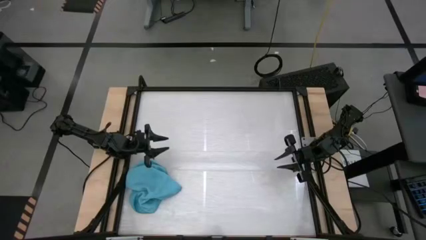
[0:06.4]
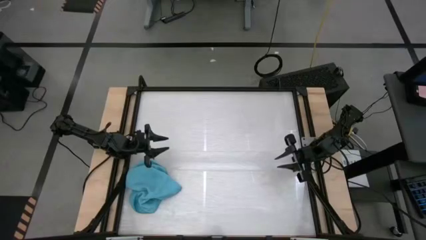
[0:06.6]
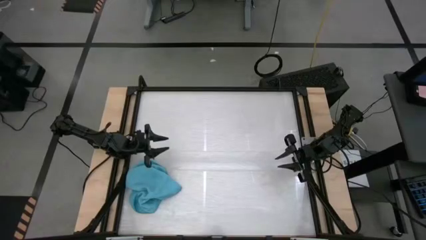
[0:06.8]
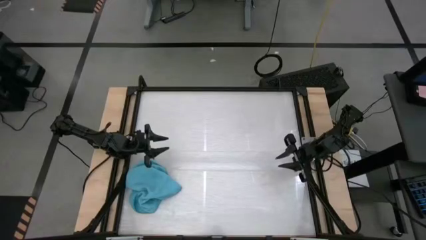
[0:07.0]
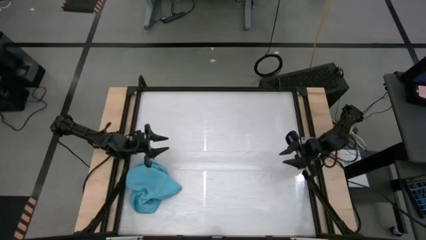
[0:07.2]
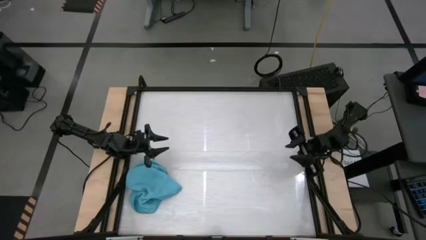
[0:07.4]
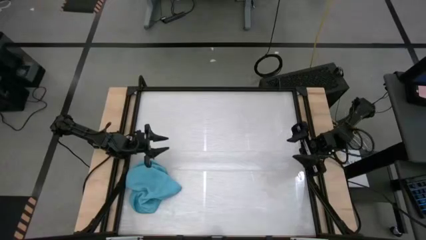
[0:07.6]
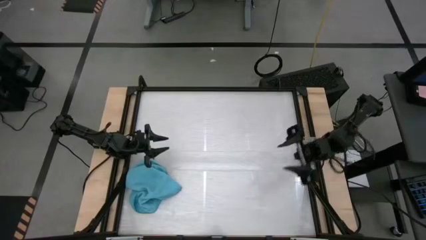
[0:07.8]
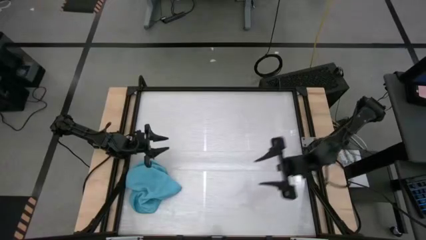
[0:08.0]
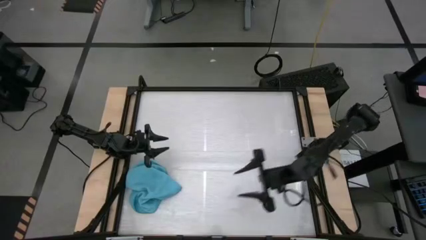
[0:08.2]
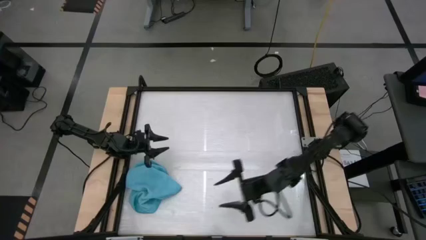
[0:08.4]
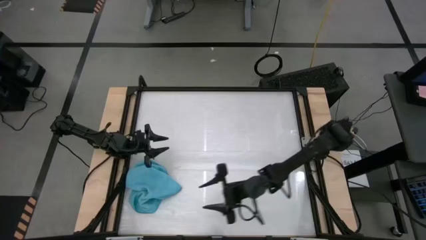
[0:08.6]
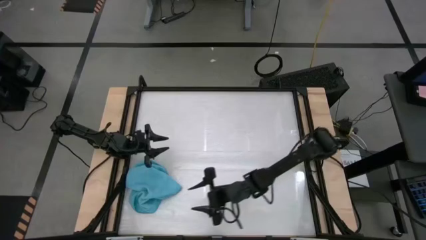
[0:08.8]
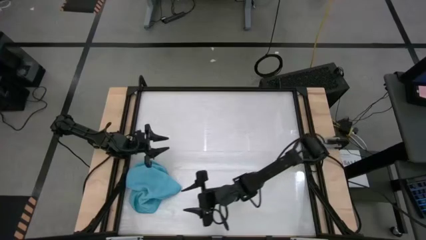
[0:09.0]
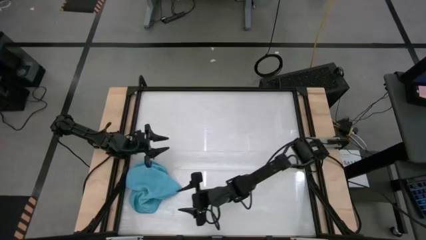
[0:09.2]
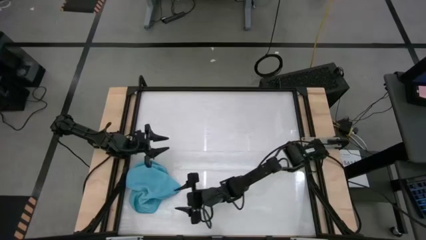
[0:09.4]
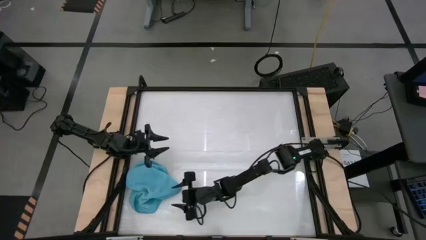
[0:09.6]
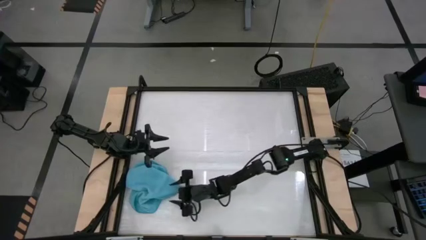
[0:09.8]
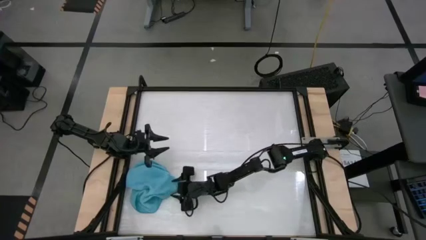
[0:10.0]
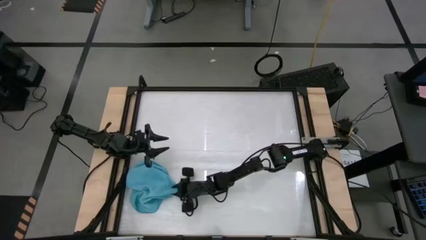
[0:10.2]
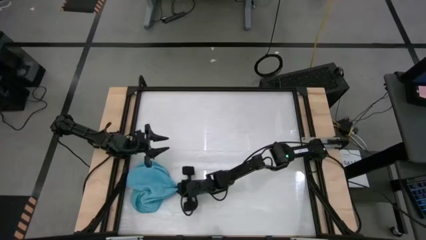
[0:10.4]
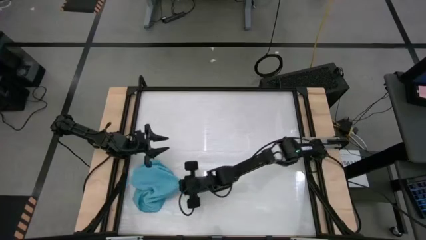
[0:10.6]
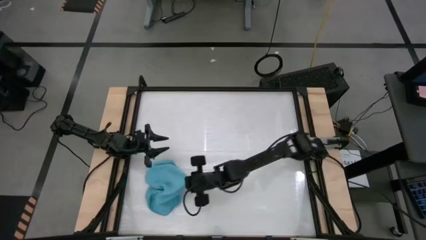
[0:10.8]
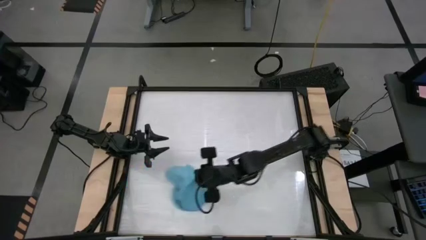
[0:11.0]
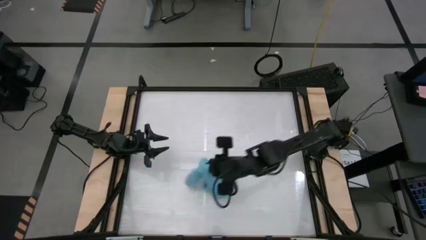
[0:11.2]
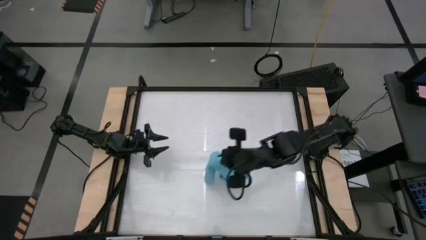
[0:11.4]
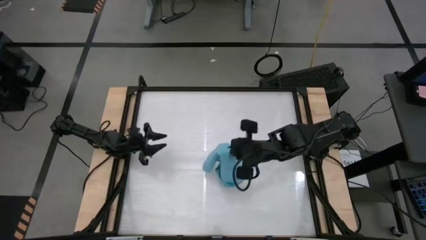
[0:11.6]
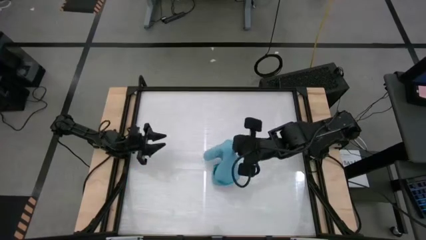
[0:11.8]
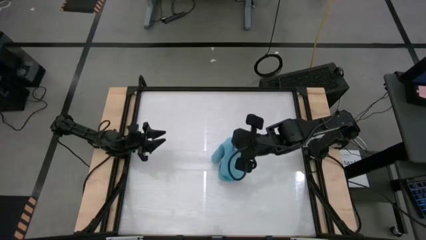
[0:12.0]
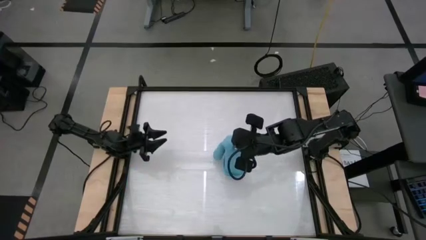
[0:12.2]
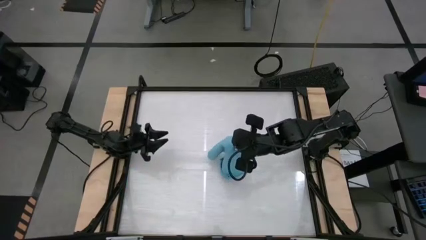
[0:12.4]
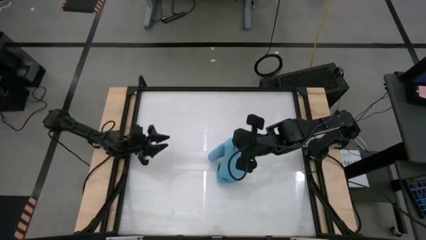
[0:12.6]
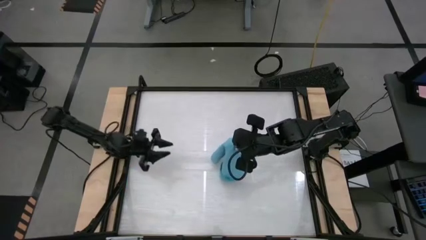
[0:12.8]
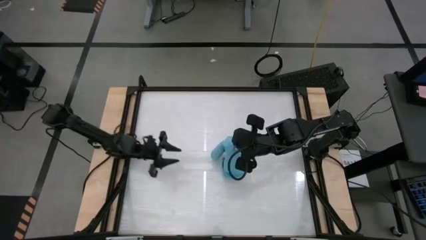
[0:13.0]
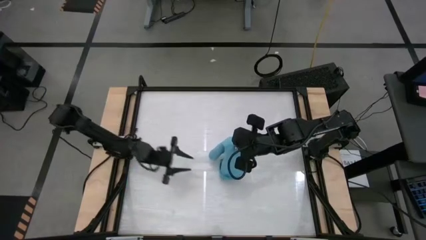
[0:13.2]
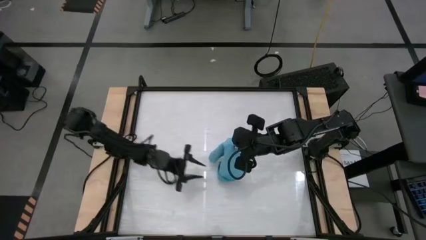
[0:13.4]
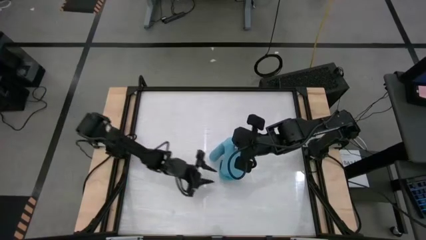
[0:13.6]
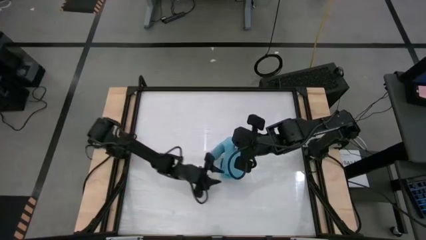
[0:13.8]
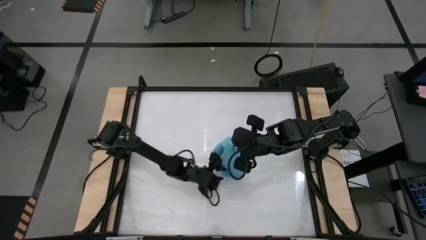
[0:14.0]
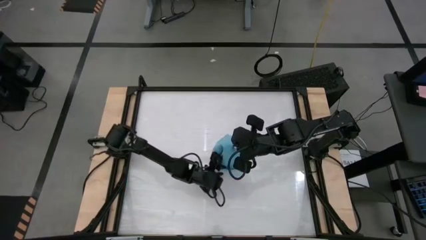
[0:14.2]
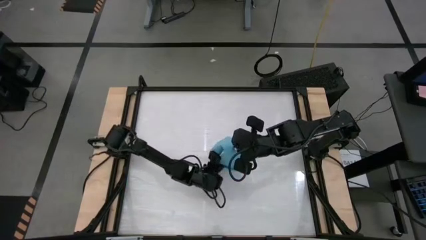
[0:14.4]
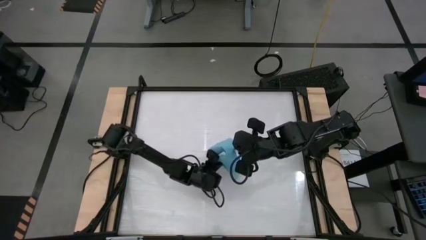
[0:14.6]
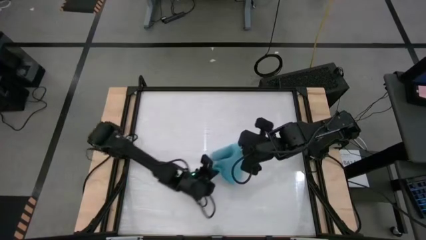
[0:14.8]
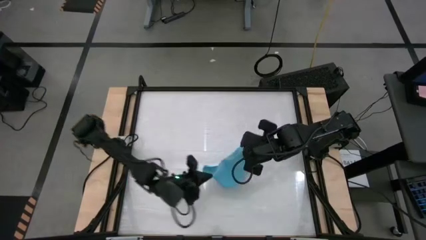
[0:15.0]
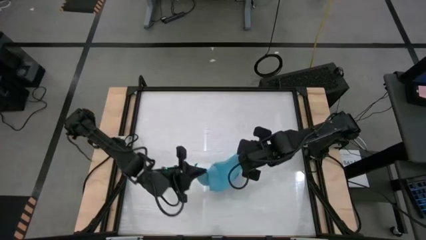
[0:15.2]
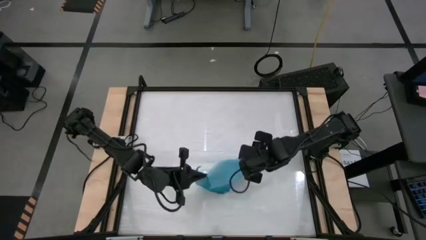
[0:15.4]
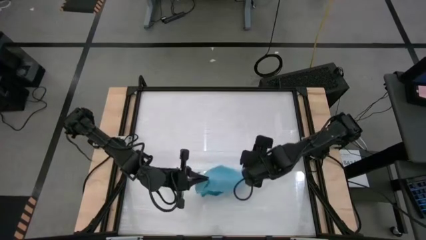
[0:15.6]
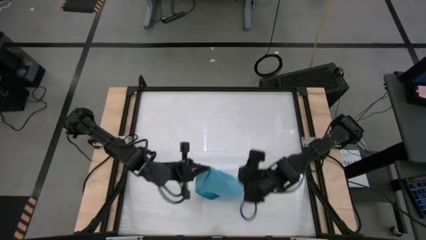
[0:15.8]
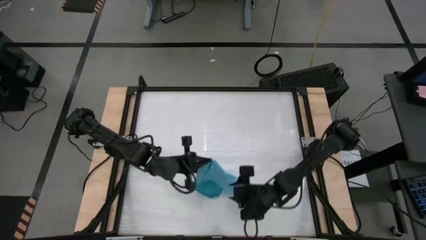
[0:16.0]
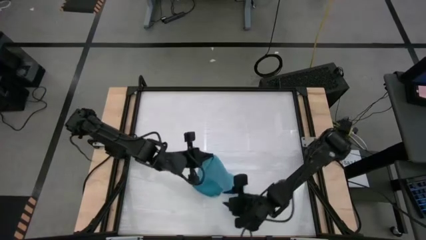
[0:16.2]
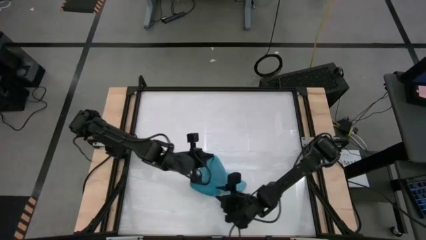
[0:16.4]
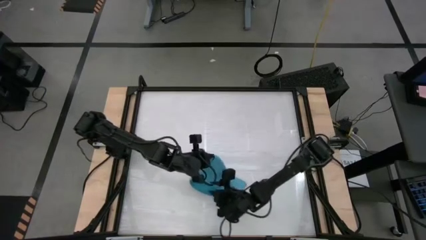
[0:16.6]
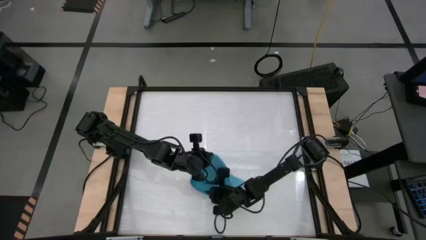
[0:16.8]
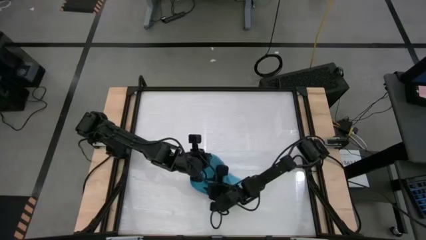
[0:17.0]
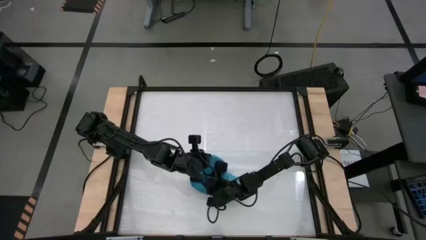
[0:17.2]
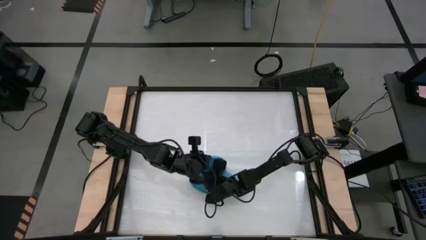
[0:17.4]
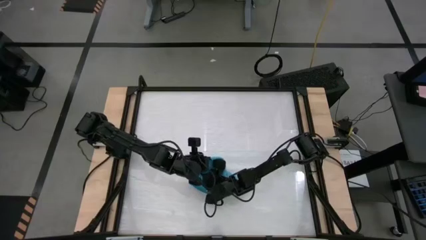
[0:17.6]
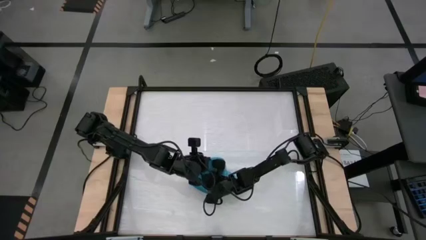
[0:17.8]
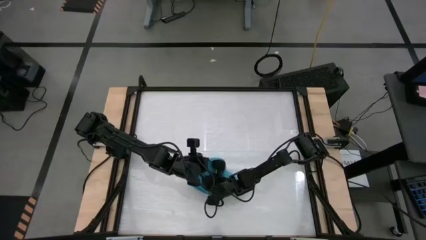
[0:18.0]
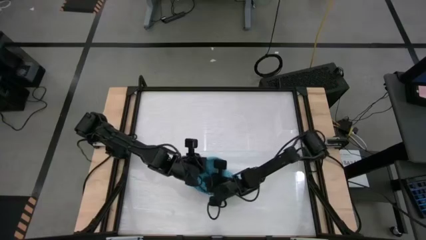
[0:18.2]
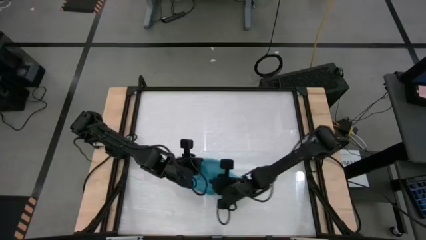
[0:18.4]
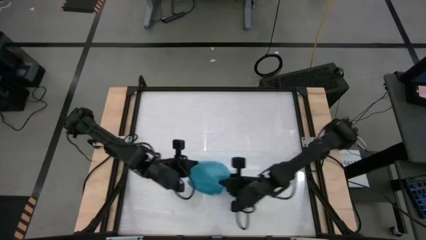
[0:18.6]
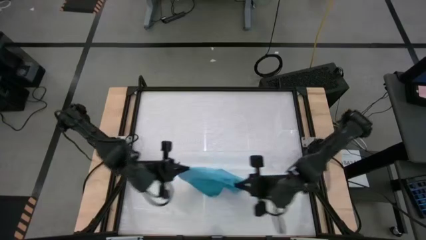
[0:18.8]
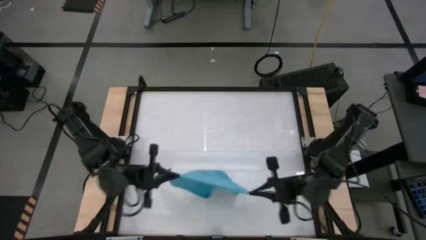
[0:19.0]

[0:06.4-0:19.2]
Task: Roll towel
Roll the blue microfiber towel

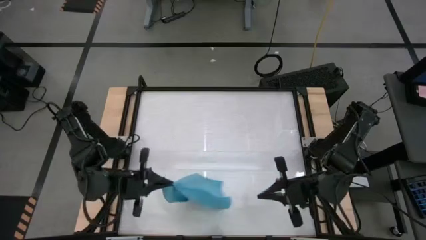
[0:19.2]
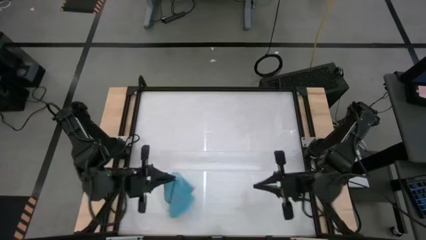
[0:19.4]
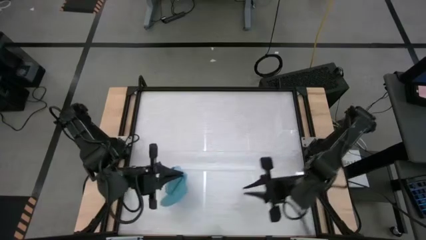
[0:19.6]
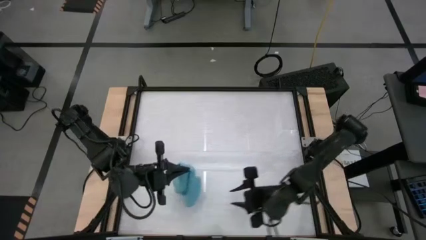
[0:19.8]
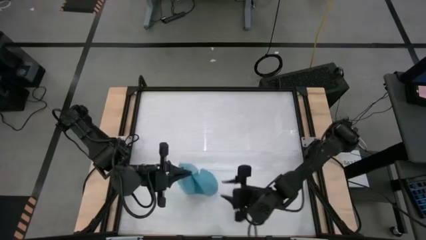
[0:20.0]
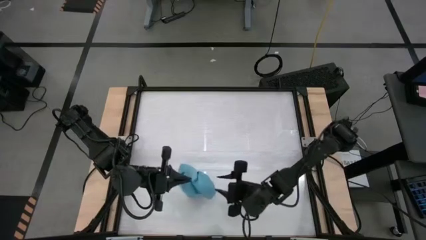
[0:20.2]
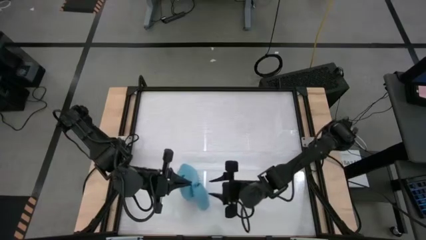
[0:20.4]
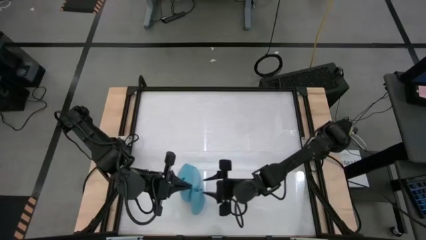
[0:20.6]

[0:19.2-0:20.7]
Roll the blue microfiber towel
